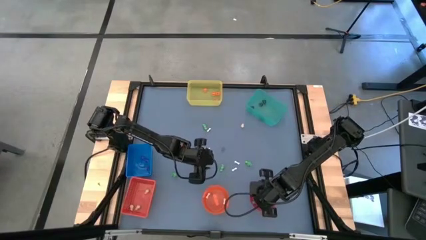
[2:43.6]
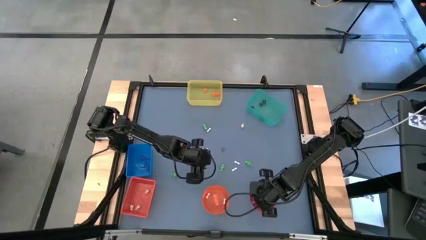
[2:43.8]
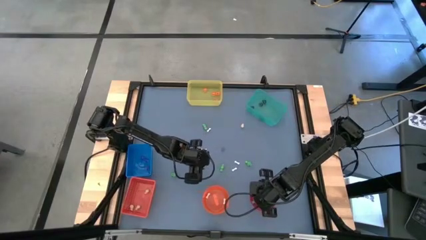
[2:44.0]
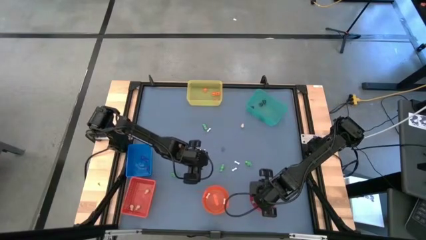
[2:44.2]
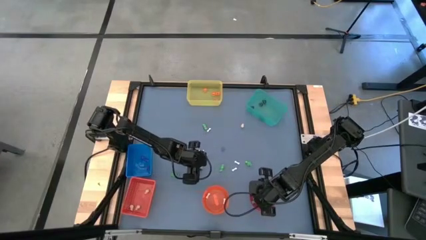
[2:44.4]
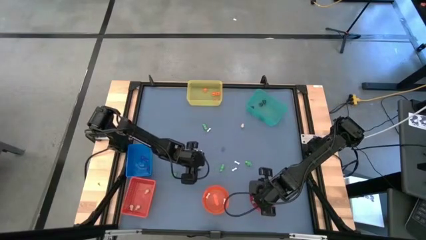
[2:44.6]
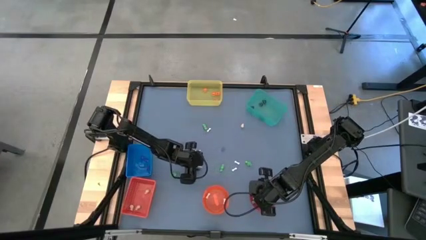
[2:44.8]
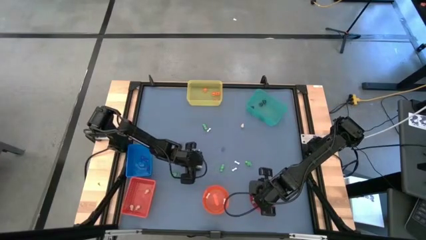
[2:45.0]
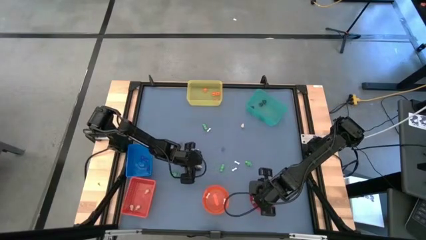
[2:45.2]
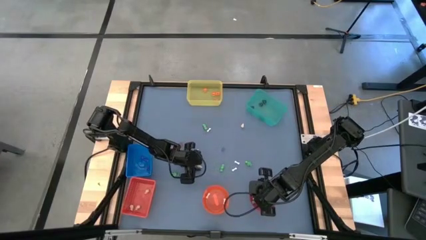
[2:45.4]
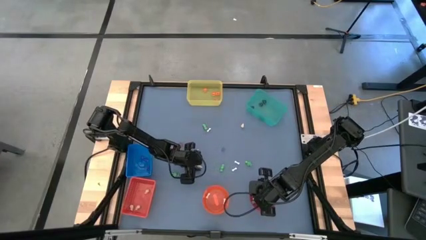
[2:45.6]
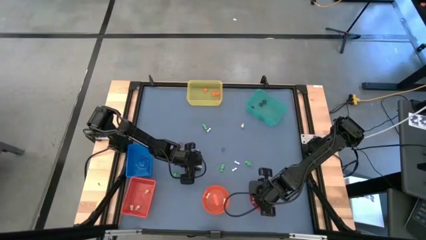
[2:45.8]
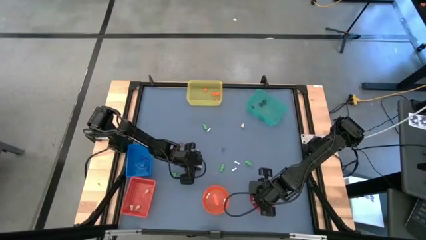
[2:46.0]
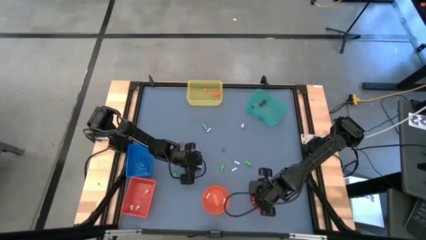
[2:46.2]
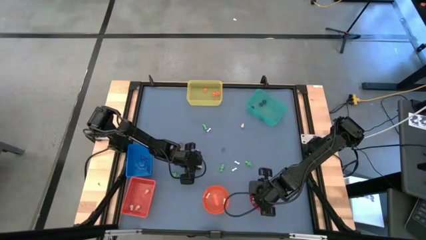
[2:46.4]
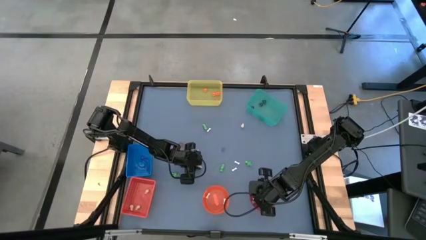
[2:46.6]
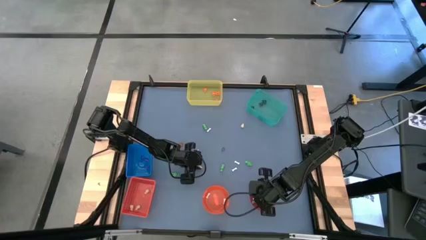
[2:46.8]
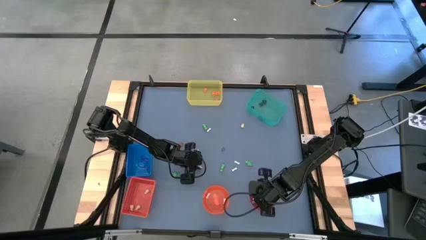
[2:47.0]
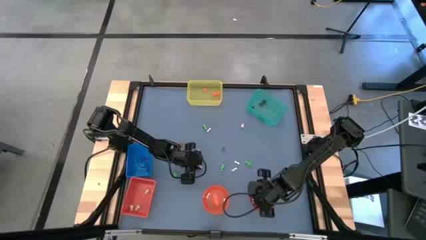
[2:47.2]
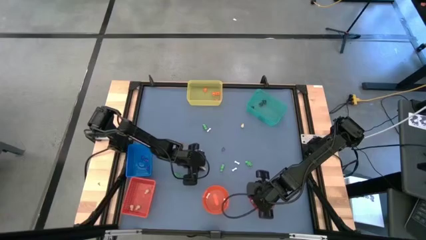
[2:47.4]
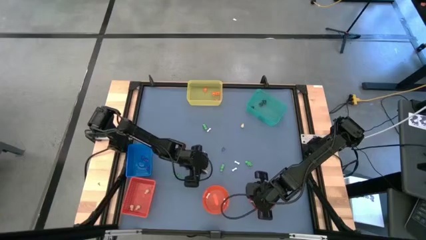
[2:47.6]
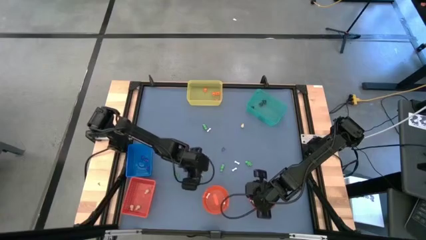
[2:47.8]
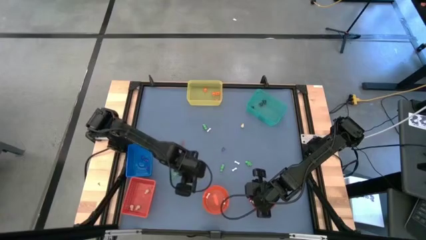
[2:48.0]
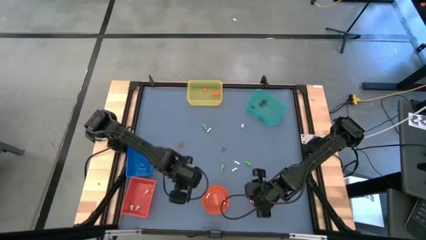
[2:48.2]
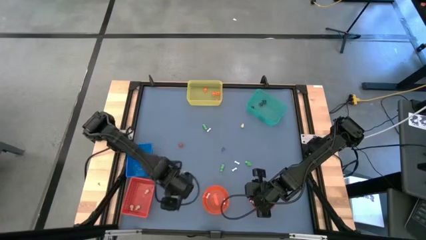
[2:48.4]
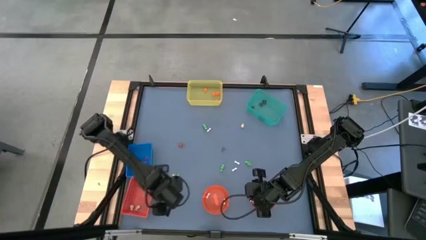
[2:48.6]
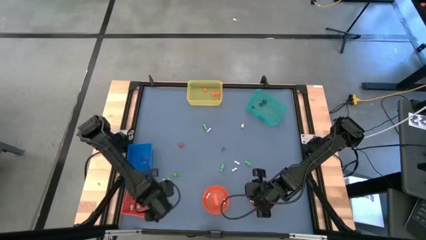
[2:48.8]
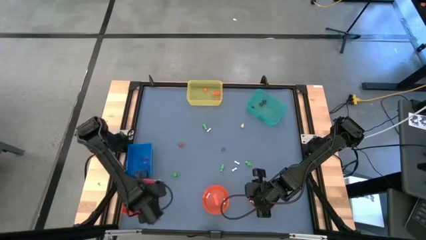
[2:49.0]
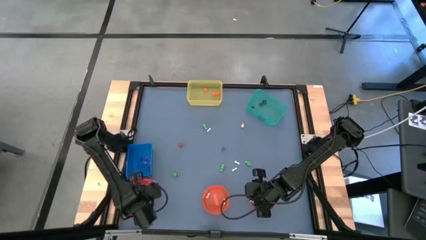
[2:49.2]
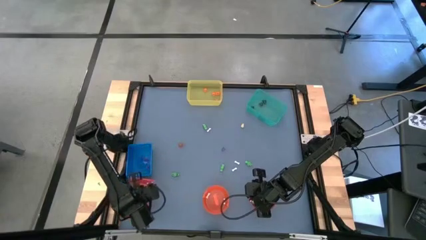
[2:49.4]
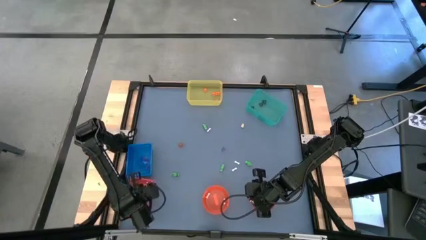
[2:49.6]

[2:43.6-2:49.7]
Task: Sort Halloween decoration
Put the brown skull toy into the red bin

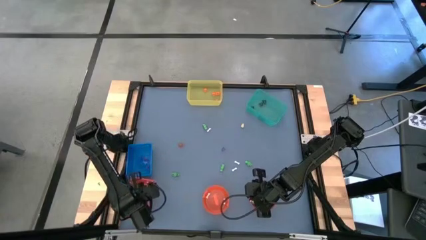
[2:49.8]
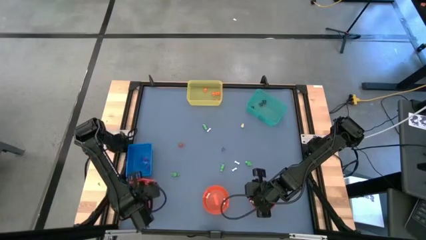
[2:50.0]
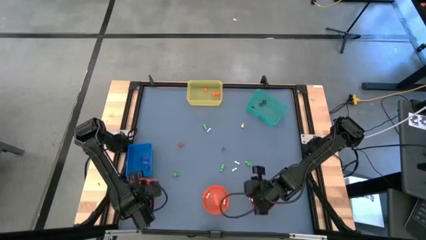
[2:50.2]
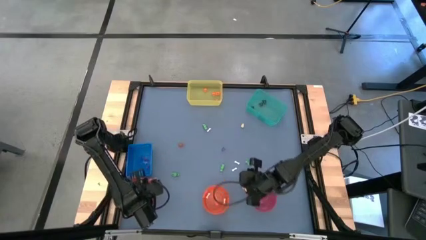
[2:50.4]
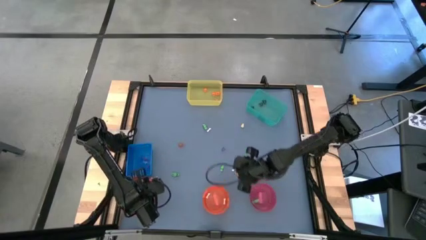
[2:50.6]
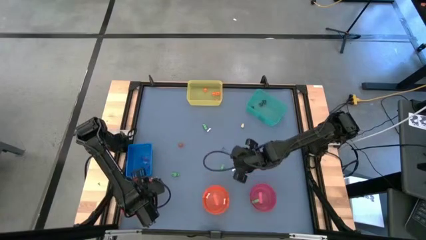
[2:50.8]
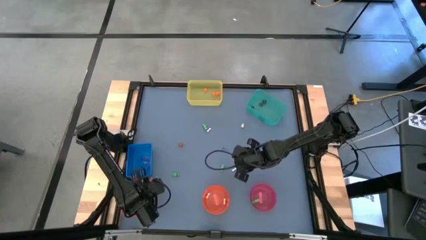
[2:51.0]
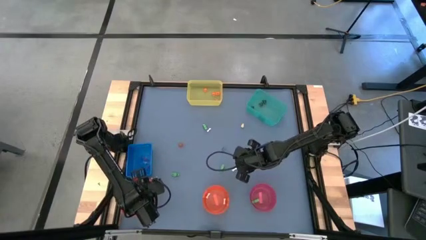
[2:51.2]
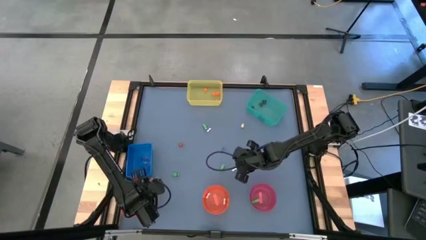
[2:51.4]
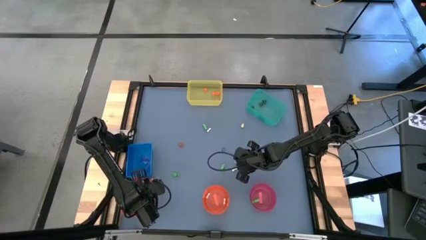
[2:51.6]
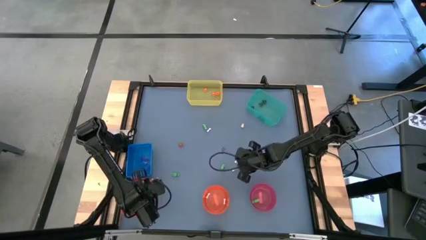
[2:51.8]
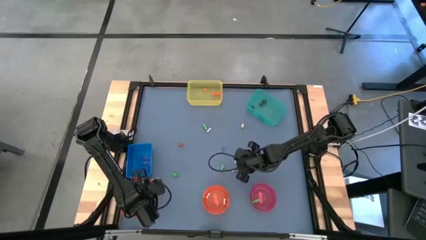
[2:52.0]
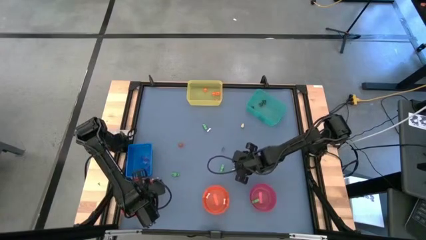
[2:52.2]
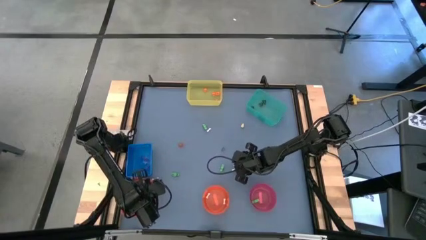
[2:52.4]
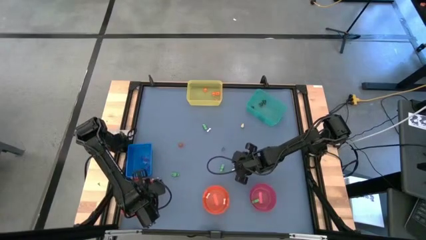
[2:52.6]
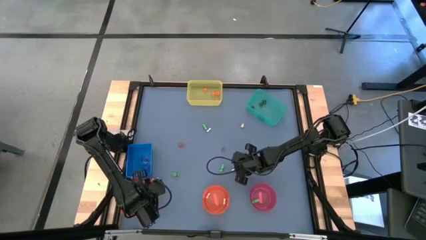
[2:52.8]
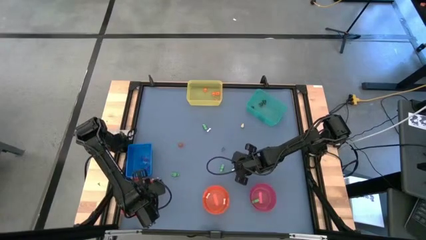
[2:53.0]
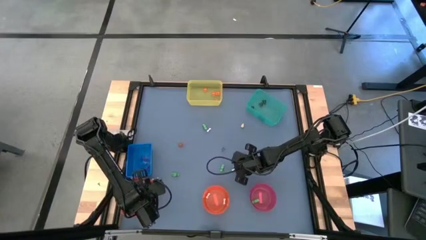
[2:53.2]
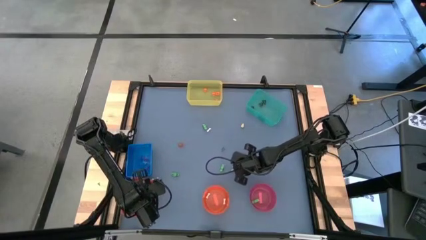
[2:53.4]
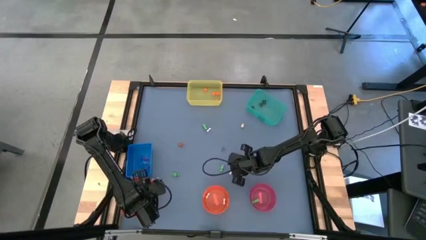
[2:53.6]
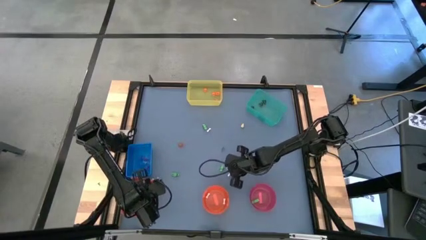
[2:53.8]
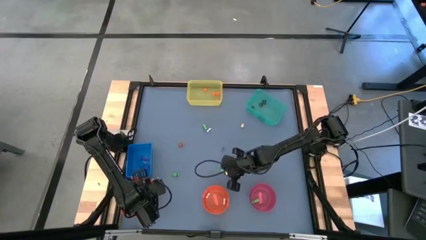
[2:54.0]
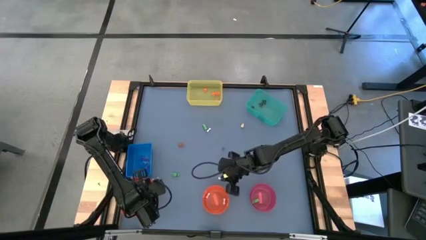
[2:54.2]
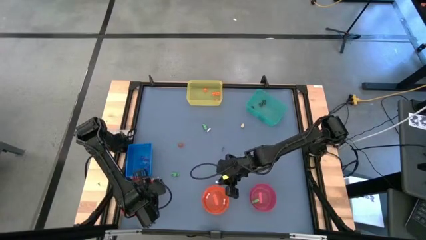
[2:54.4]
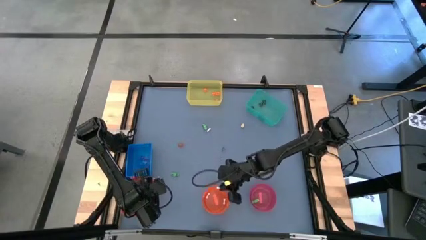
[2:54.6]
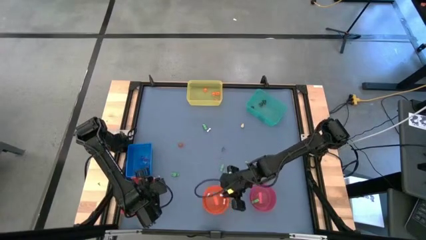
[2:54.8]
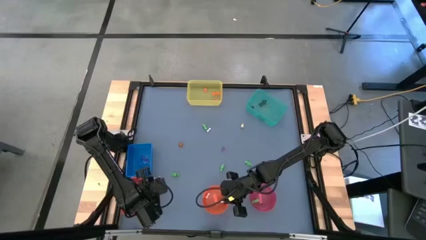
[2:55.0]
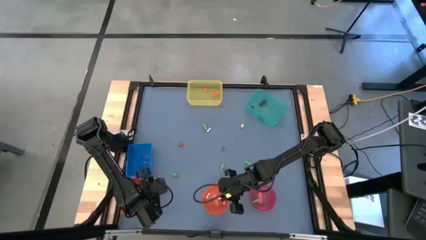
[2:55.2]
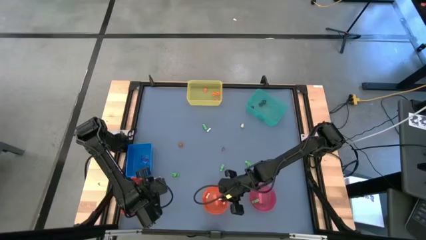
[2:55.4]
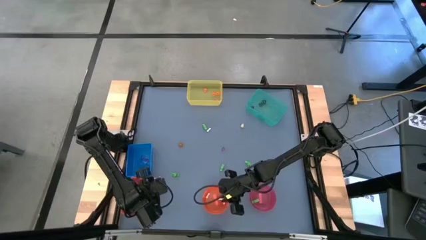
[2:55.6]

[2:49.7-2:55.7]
Put the white bone toy into the orange bowl
